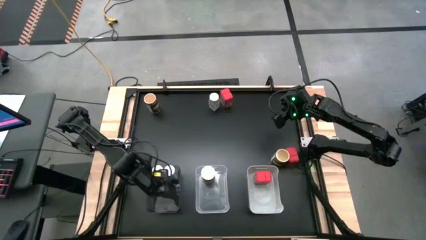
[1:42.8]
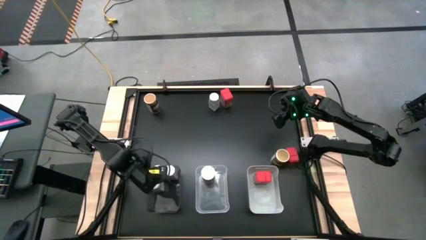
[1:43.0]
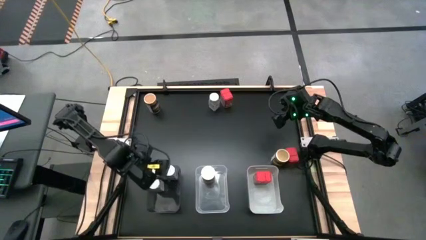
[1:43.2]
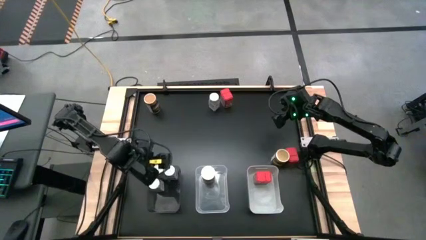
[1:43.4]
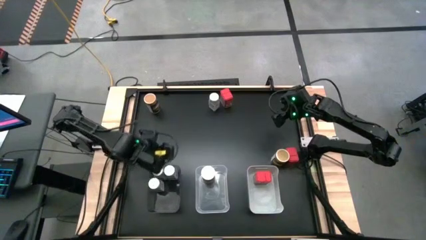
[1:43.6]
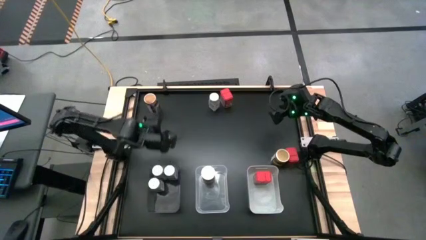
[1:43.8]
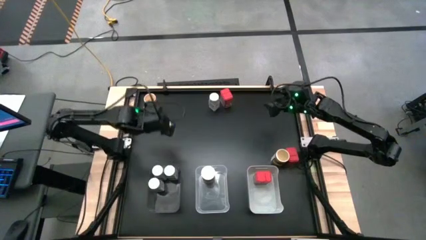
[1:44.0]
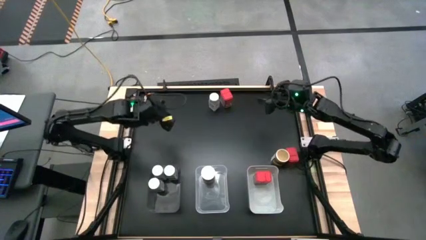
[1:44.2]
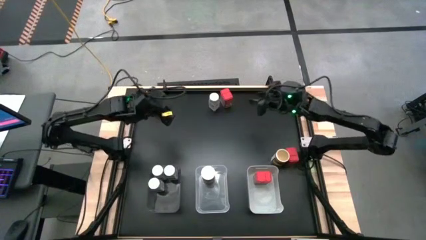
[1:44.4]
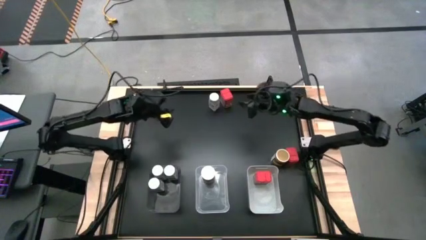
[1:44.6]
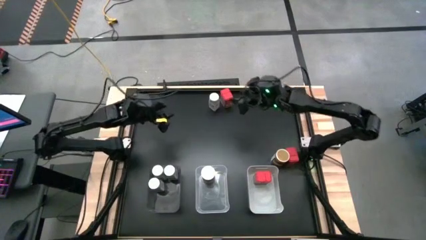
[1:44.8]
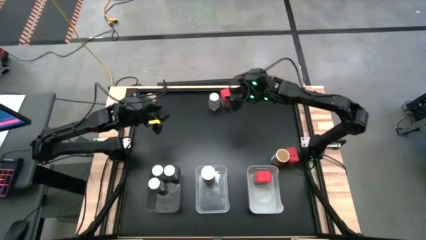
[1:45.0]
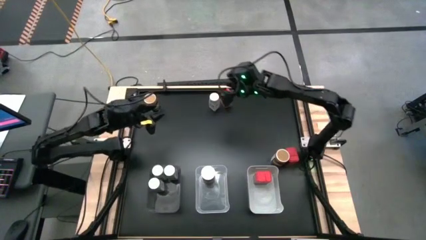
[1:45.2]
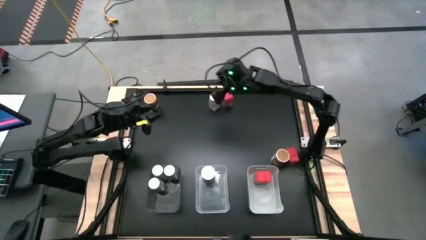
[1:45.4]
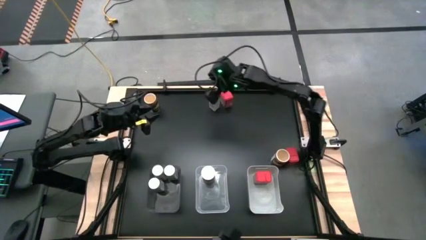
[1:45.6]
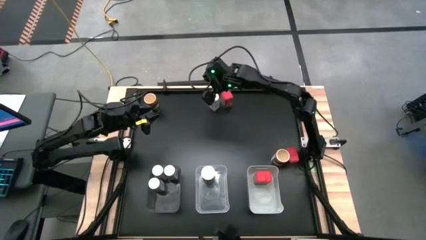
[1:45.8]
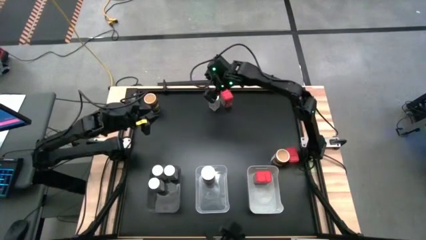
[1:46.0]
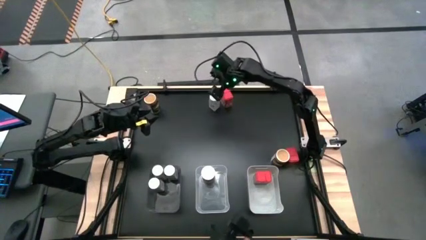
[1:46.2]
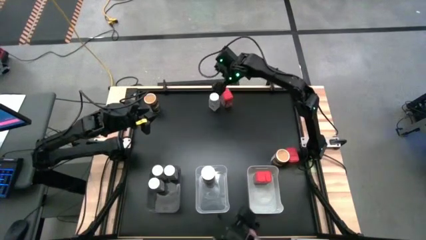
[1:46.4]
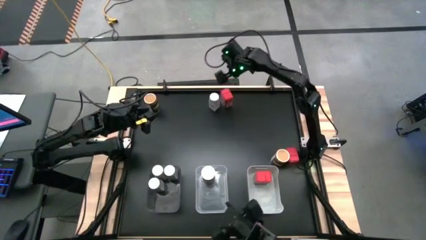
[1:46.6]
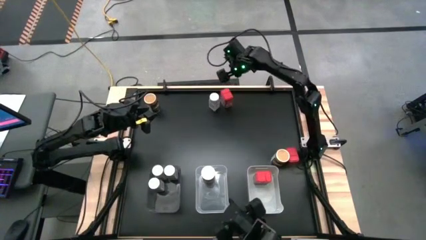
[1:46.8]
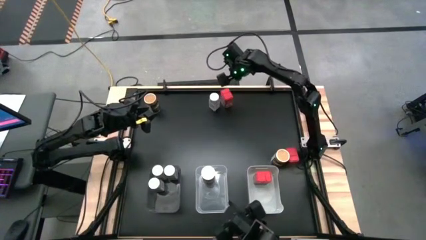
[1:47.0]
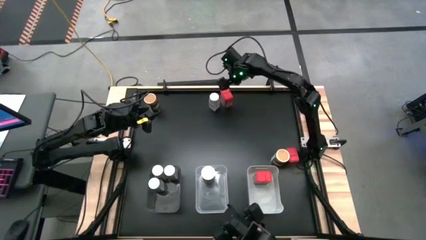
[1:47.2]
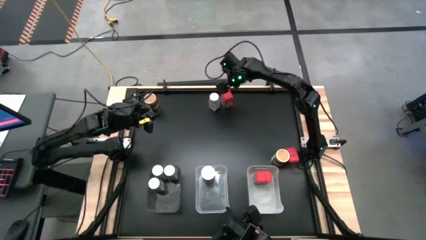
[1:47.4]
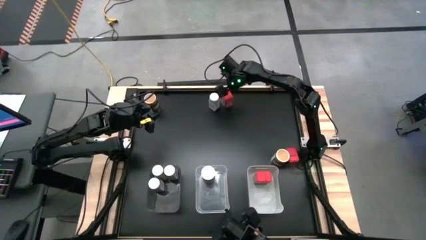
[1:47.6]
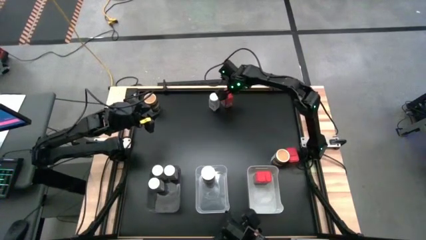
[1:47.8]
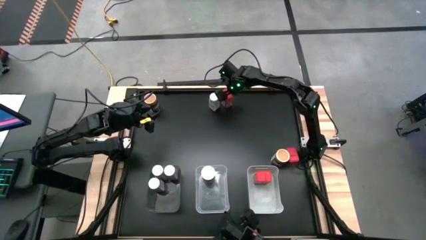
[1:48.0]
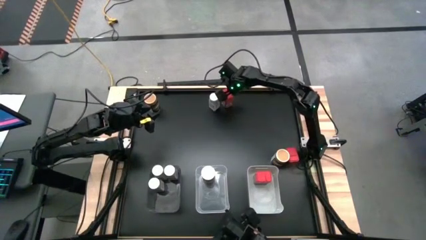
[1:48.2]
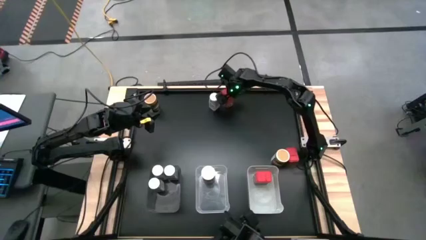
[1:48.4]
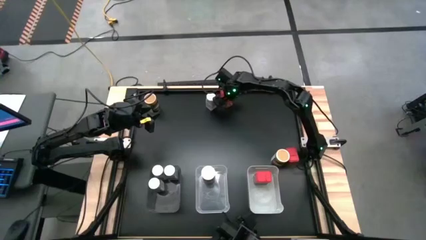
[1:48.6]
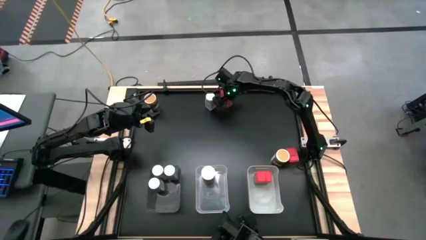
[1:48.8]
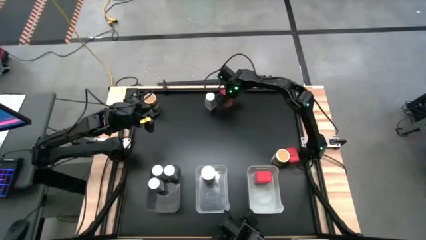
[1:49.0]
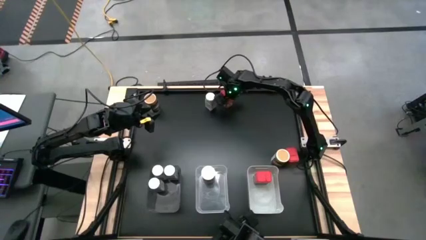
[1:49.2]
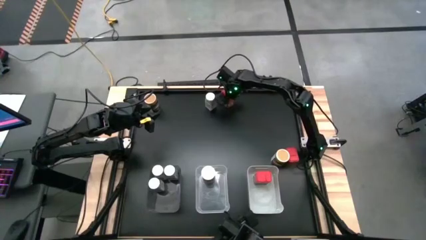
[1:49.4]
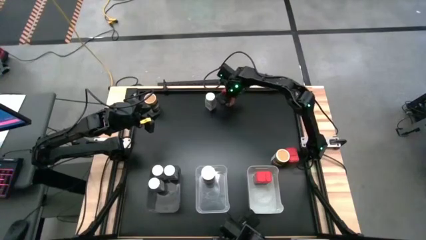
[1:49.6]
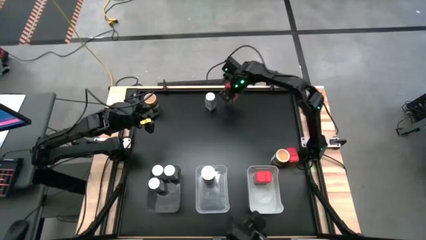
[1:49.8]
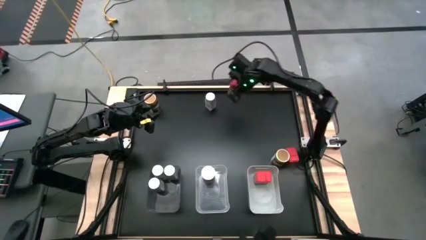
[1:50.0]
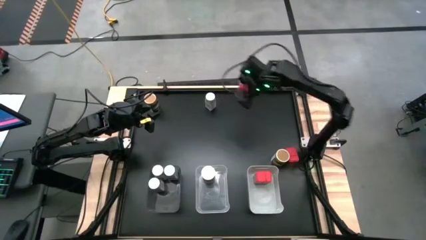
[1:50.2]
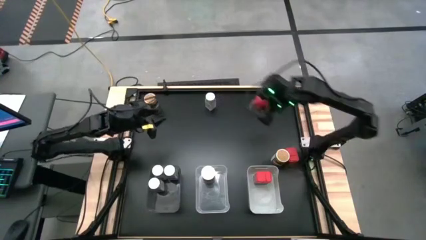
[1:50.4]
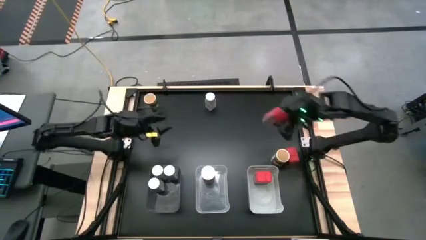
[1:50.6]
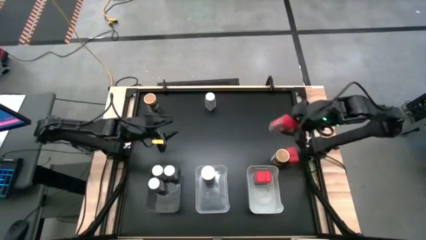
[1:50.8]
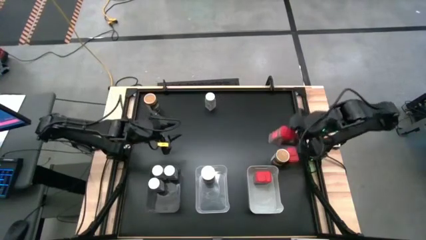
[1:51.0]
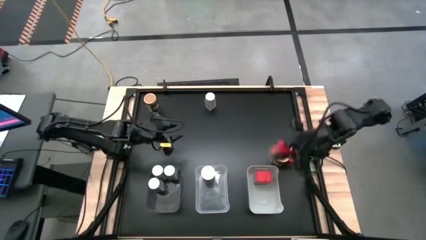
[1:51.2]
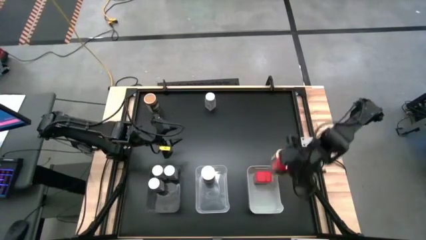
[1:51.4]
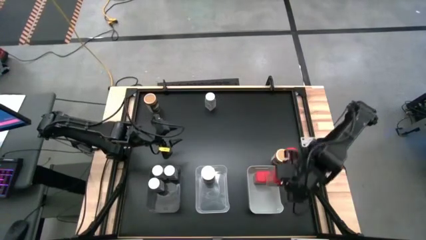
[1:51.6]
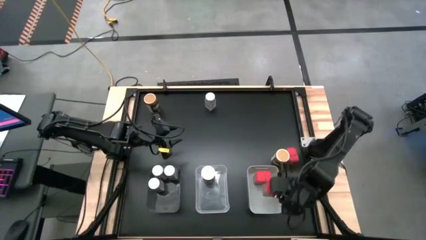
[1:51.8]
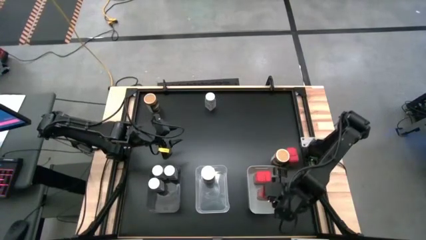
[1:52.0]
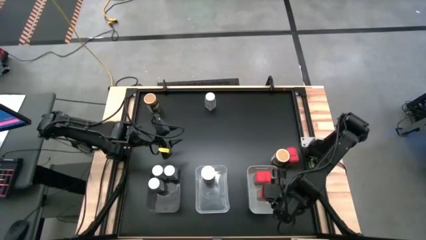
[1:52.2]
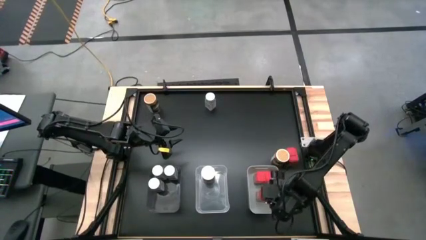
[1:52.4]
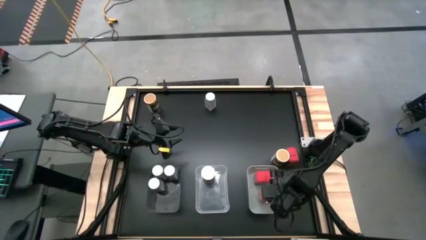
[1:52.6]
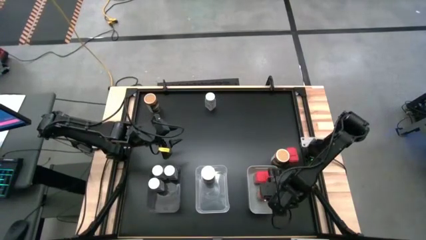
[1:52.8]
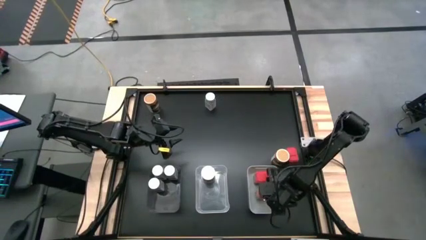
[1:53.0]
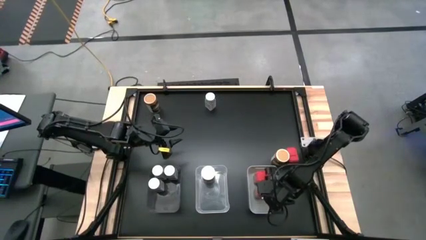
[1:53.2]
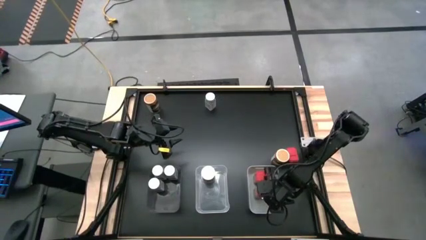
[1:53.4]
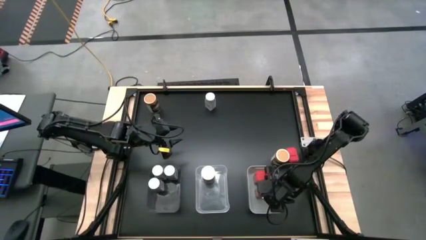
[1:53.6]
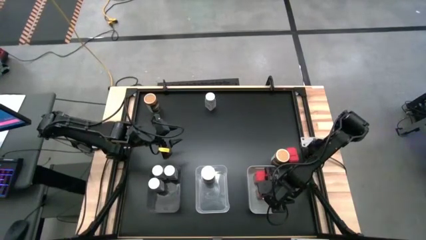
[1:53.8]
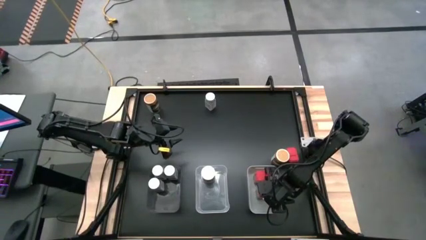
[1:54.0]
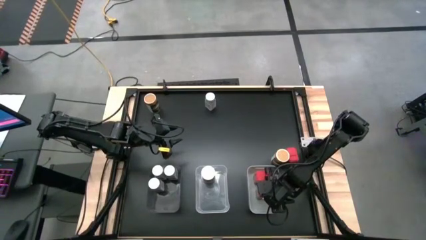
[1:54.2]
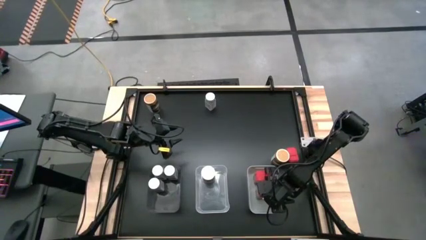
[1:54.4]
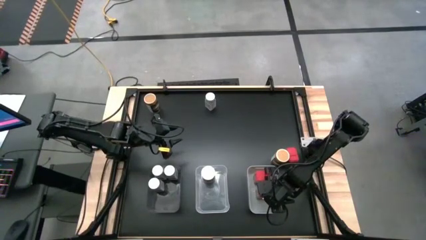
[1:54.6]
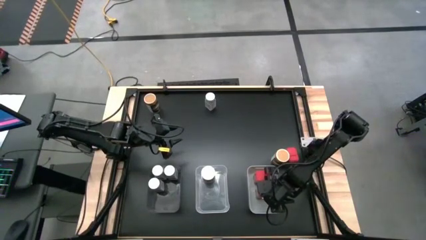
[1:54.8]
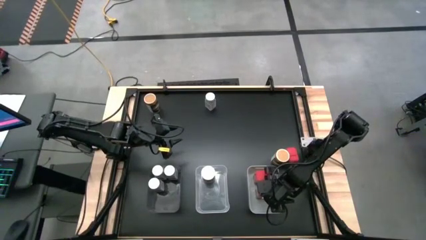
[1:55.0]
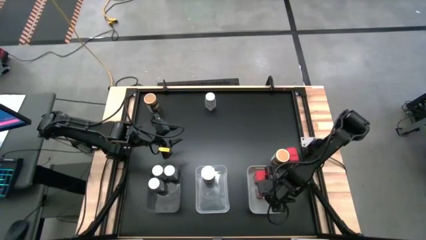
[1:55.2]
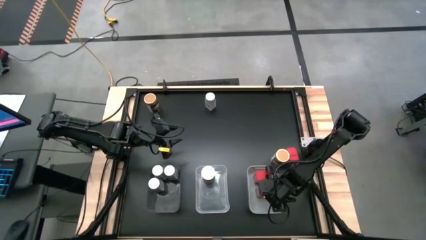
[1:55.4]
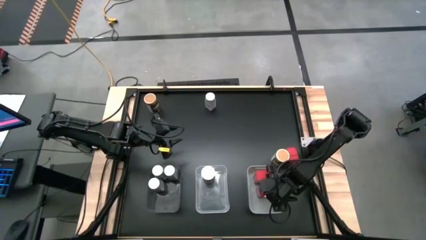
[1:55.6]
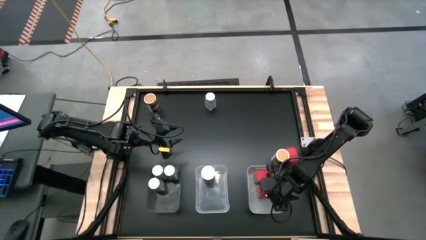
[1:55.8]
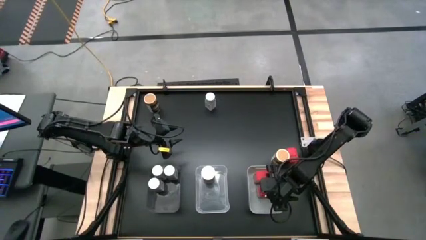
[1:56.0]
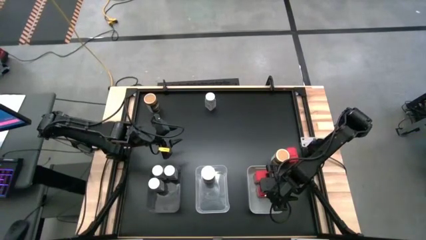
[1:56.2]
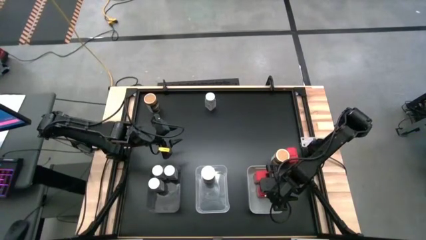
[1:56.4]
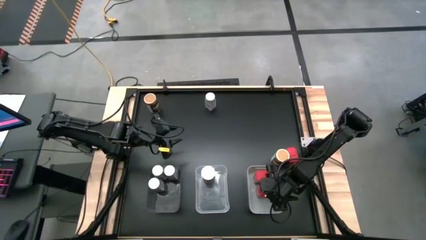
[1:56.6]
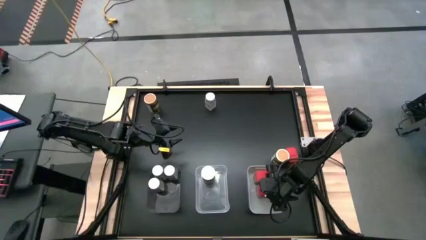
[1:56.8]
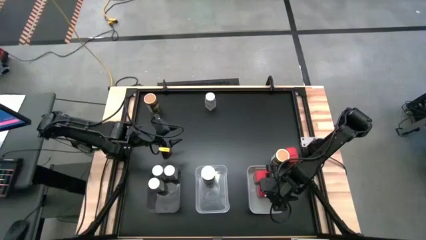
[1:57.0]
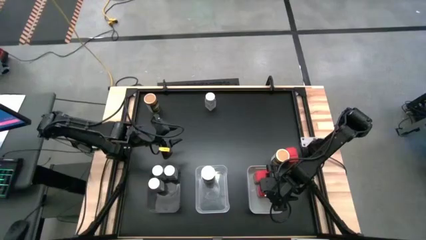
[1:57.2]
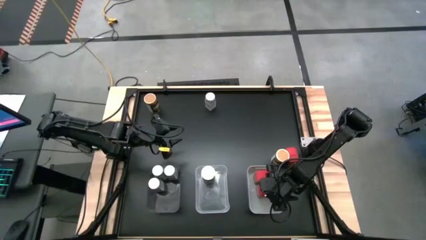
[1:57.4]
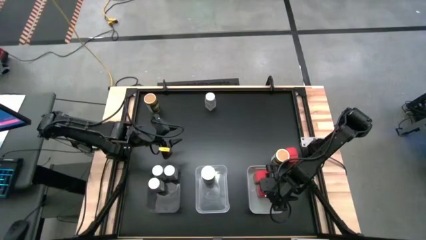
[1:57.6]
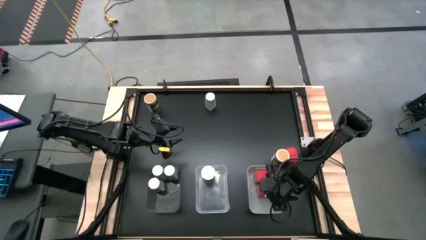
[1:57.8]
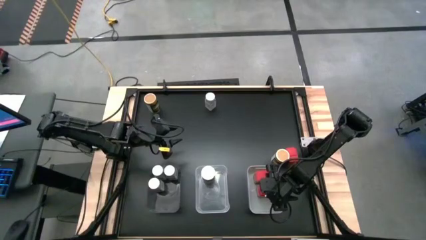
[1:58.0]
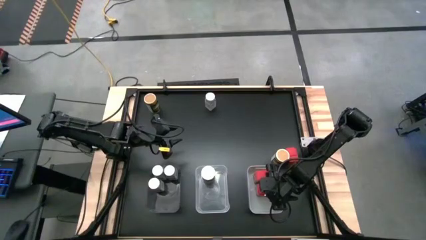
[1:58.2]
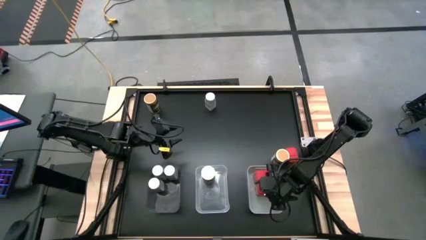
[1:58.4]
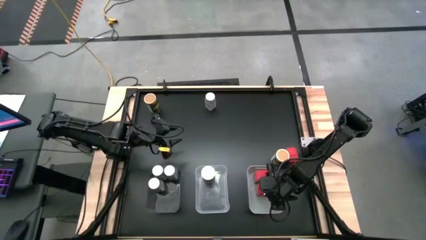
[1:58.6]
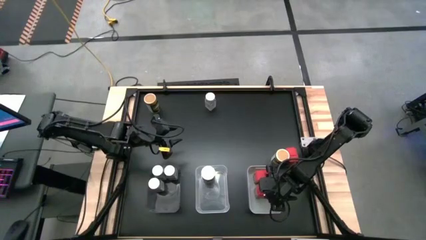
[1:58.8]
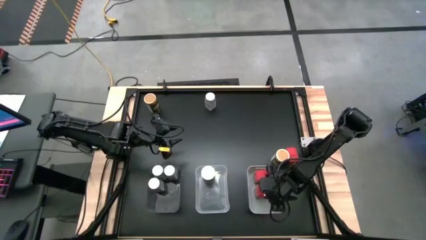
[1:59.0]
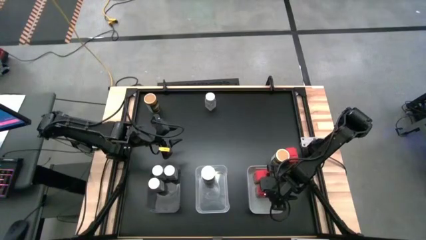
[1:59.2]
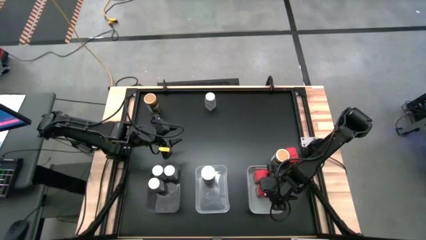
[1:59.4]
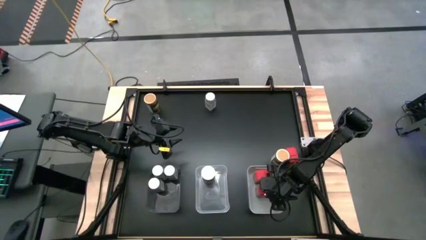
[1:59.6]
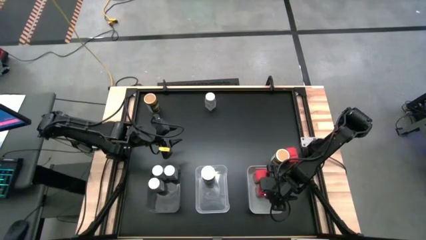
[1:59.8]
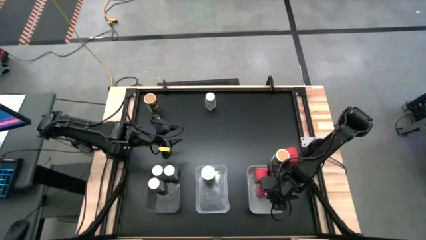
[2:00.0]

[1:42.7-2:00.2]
Task: Sort spices by type
Put the top red seasoning can into the white bin
